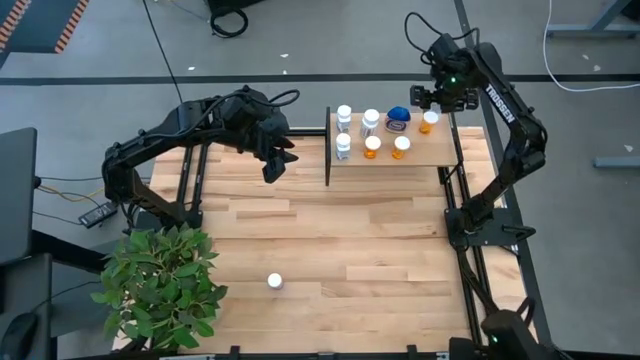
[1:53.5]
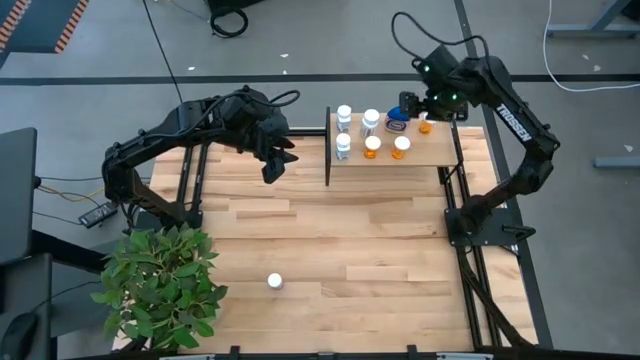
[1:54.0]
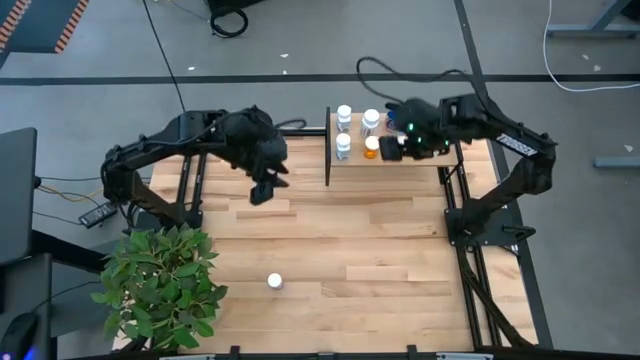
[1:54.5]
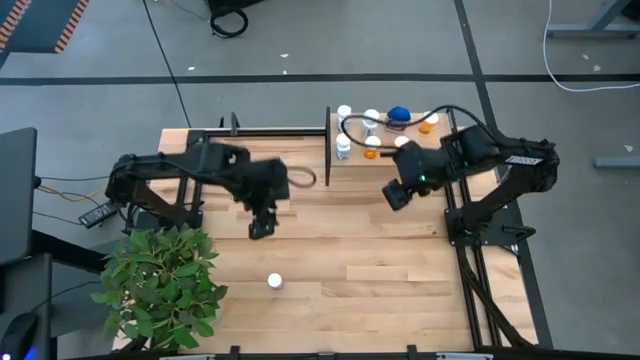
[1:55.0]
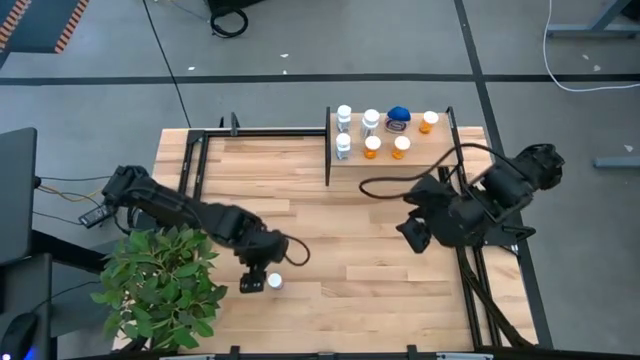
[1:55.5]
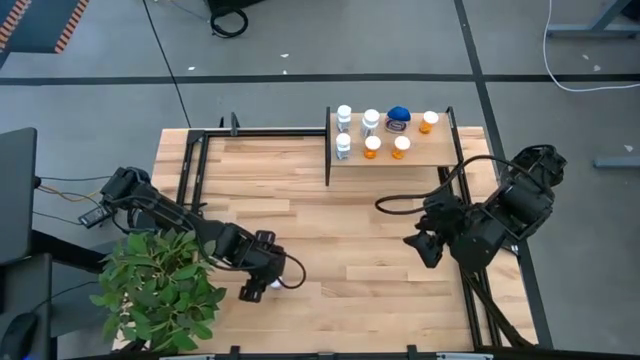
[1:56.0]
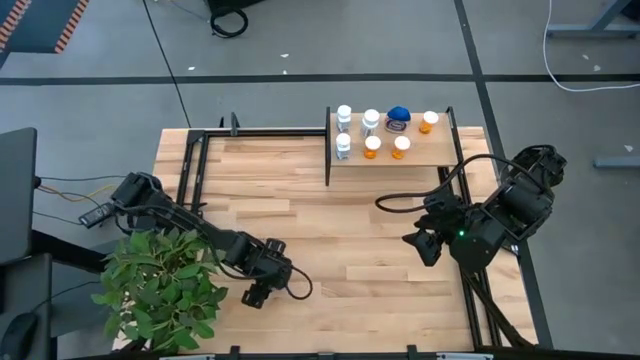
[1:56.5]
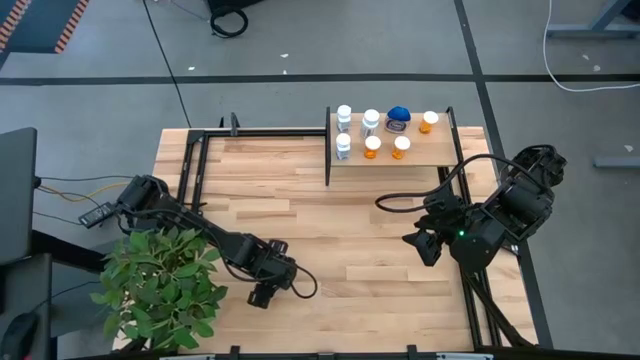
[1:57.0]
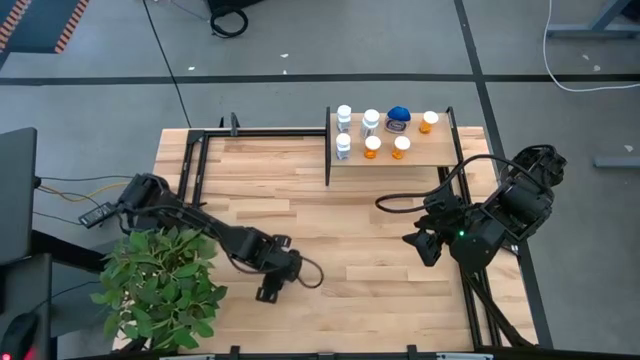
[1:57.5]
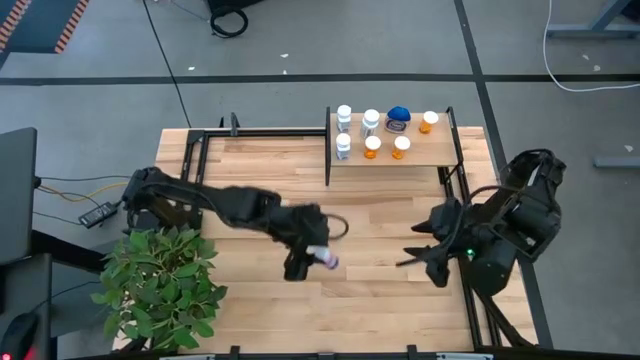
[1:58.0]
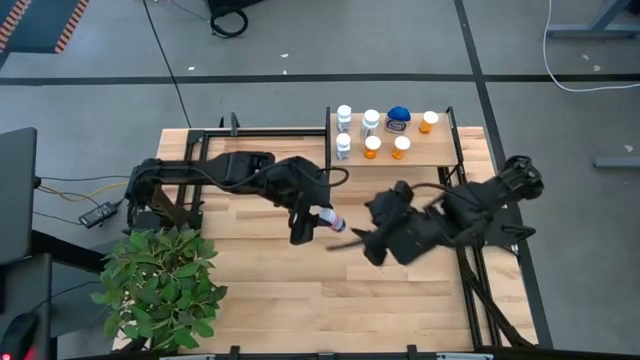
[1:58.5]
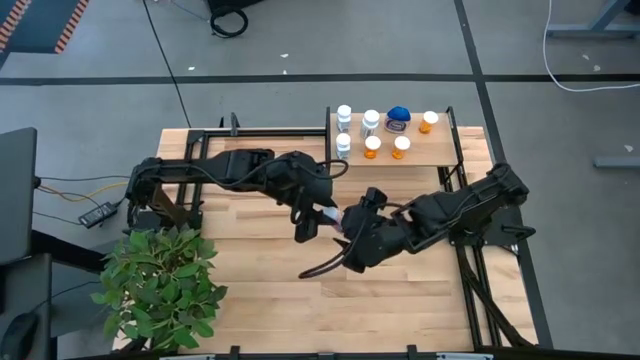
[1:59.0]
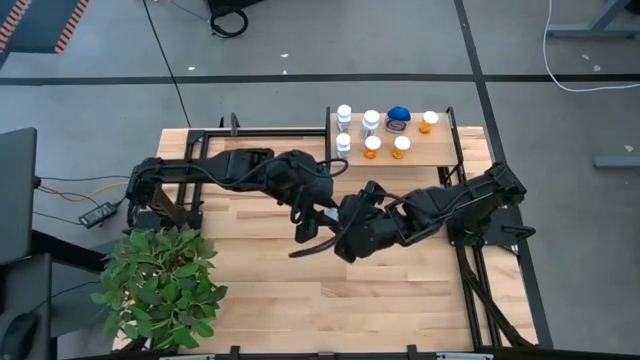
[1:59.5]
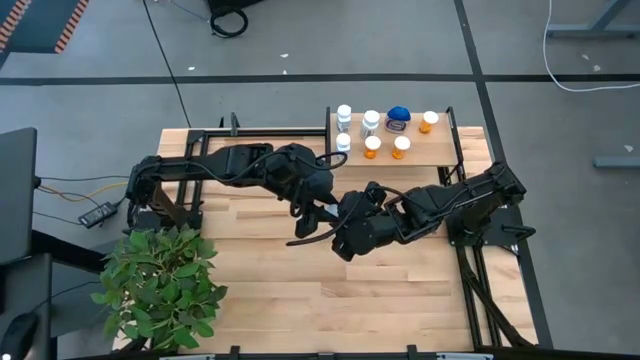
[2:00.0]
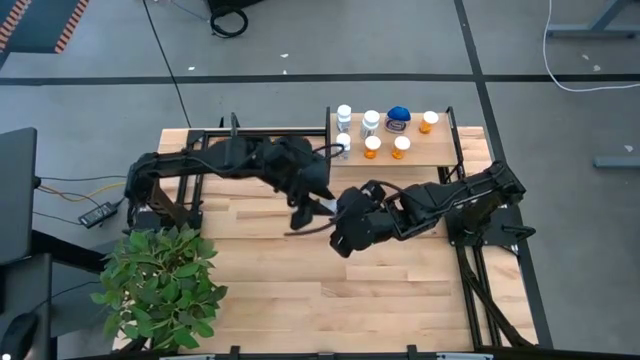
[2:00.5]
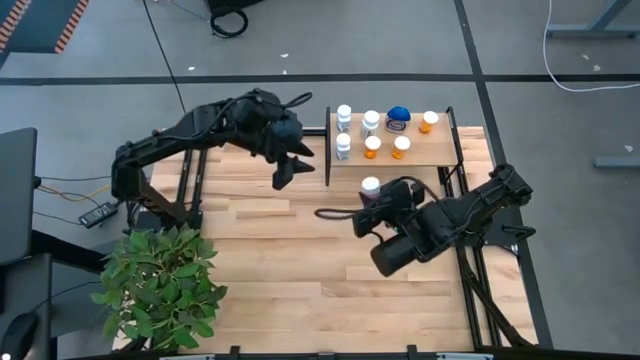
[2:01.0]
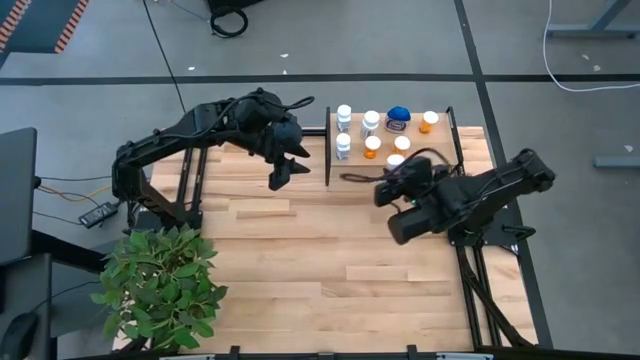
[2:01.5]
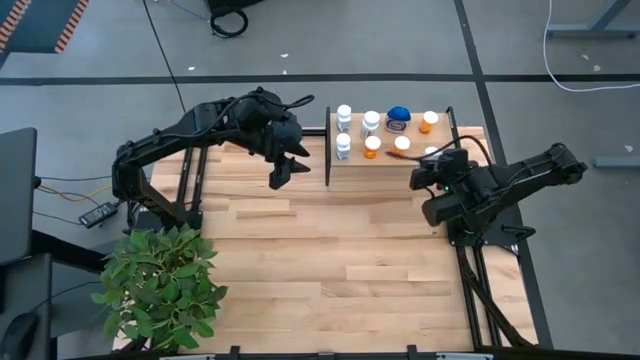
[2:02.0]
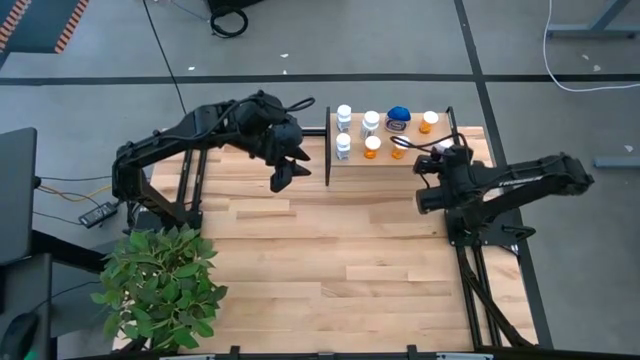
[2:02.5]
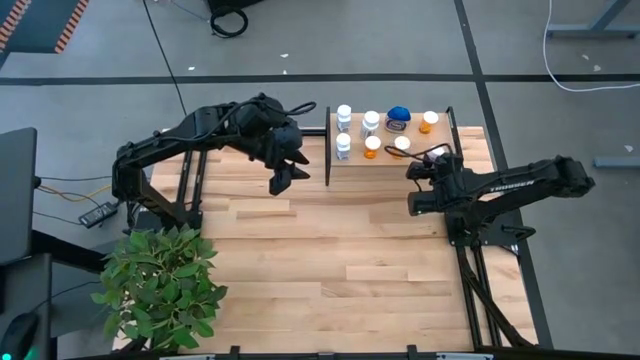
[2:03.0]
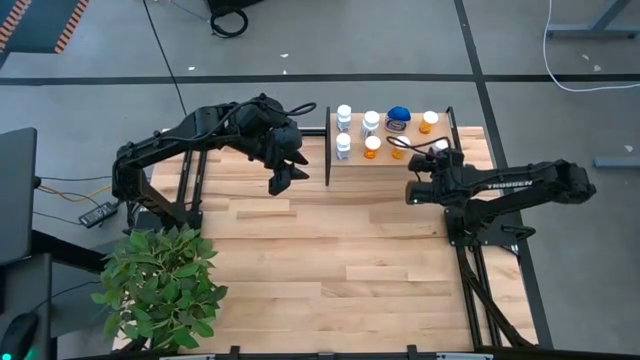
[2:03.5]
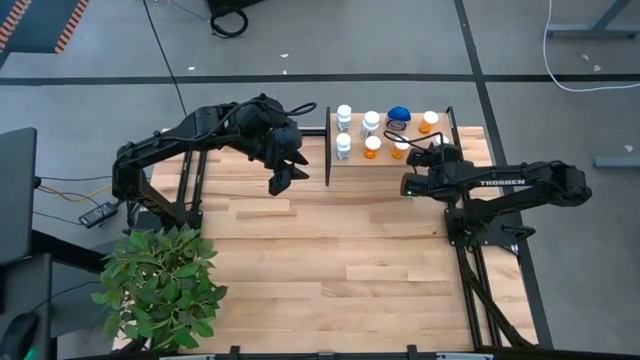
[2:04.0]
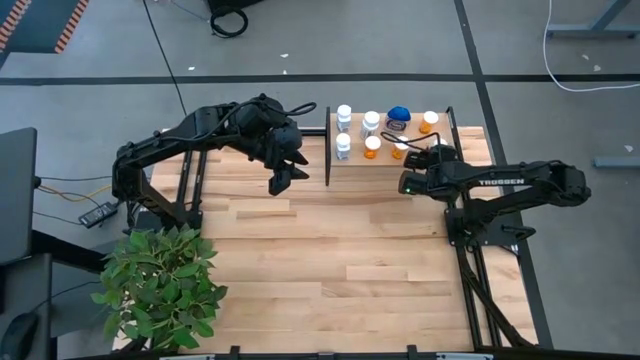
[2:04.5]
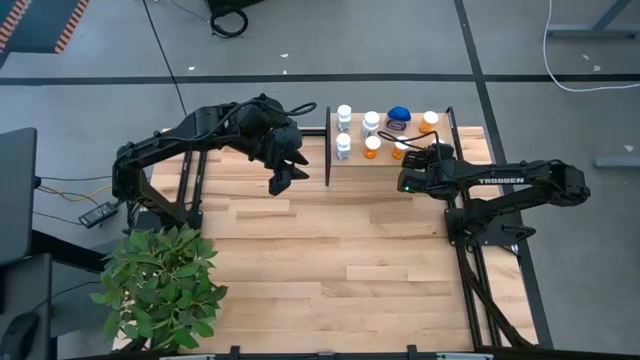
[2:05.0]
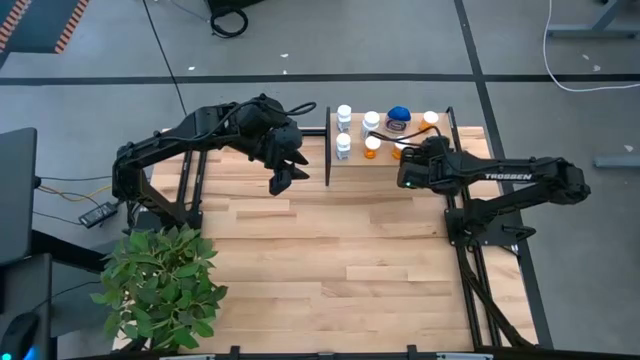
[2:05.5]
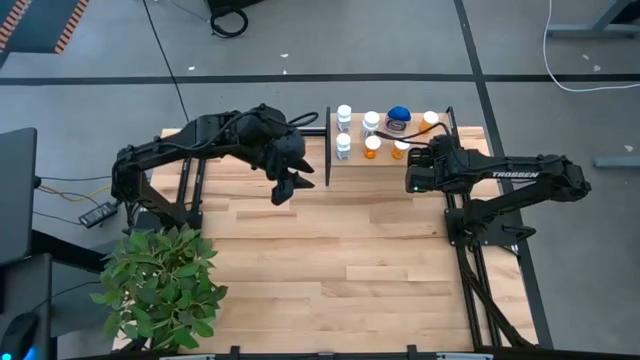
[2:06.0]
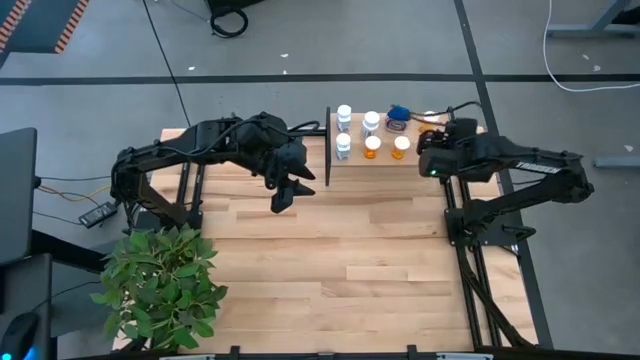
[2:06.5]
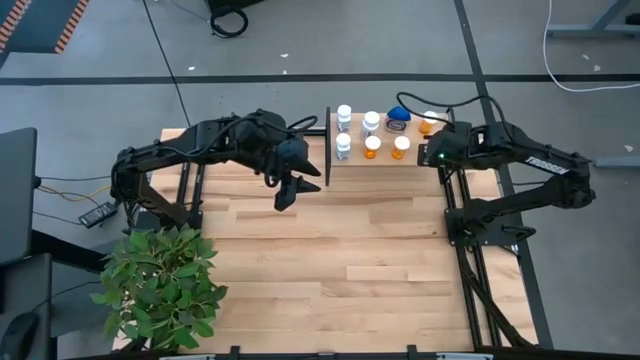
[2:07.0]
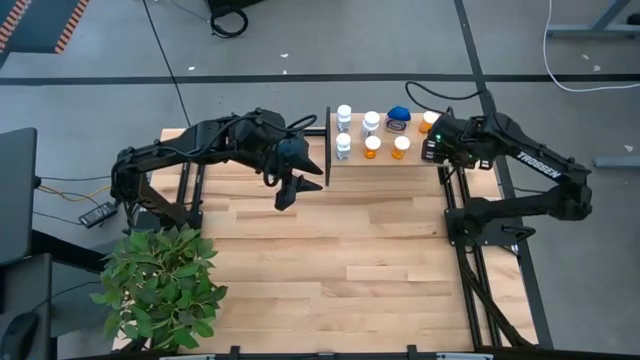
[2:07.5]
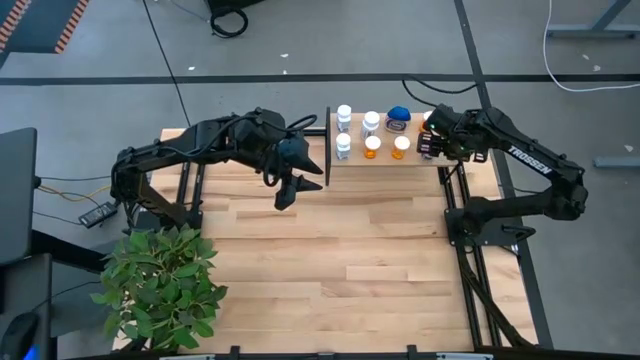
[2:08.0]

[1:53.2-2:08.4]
Task: Pick and place medicine bottles onto shelf by color
Put the pink medicine bottle on the shelf

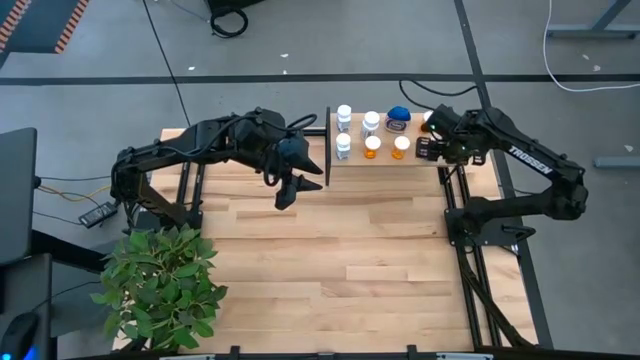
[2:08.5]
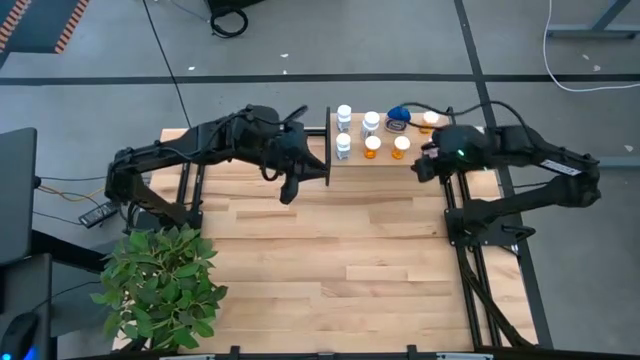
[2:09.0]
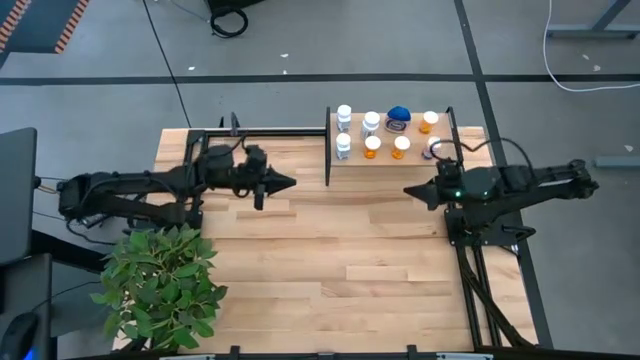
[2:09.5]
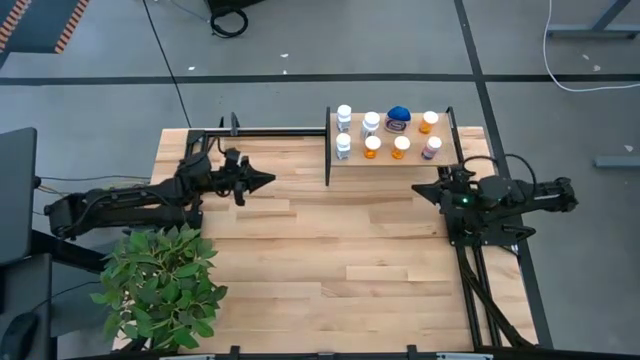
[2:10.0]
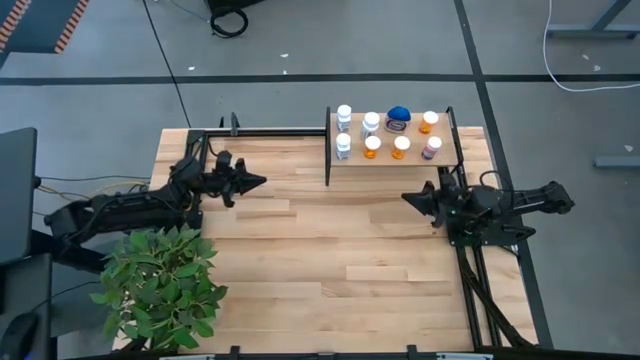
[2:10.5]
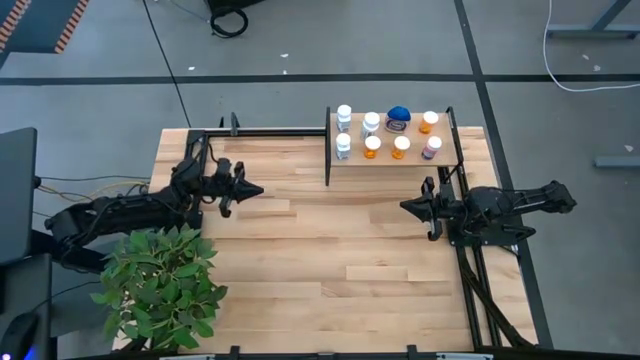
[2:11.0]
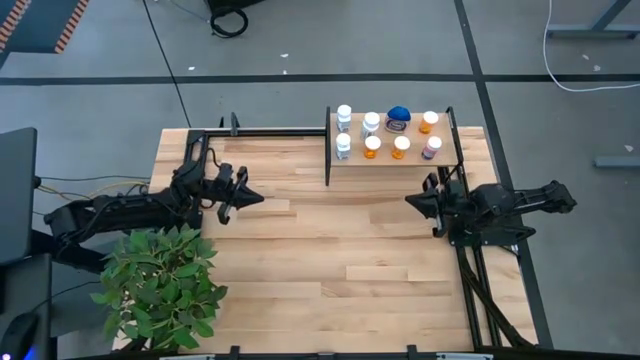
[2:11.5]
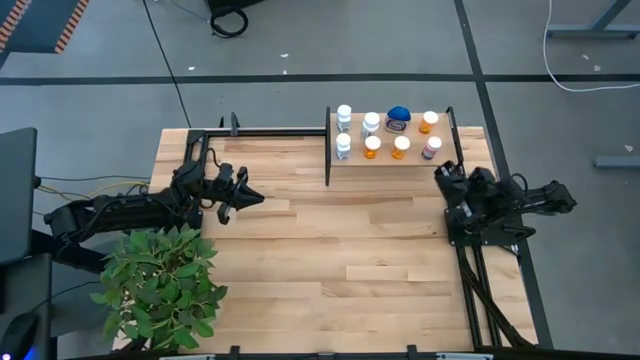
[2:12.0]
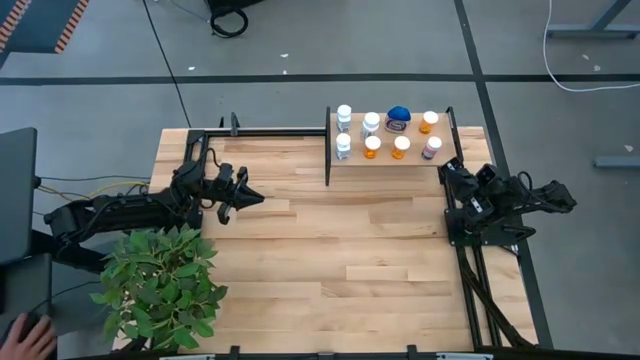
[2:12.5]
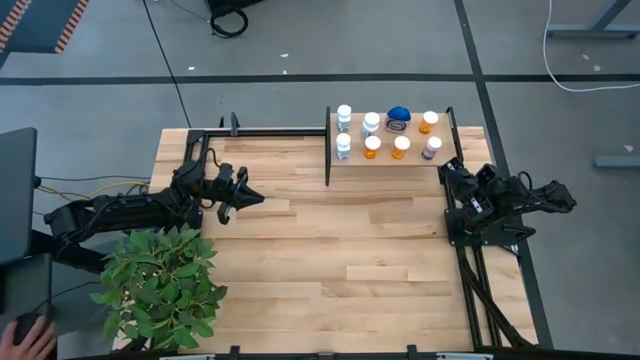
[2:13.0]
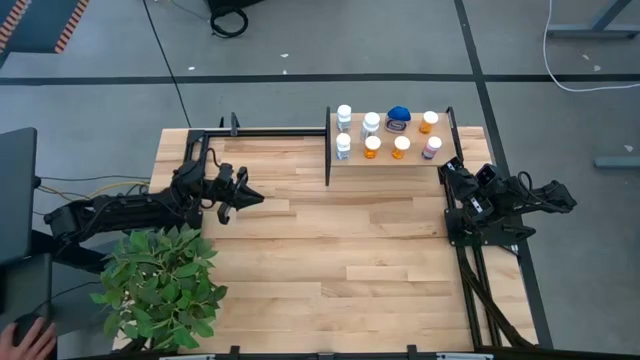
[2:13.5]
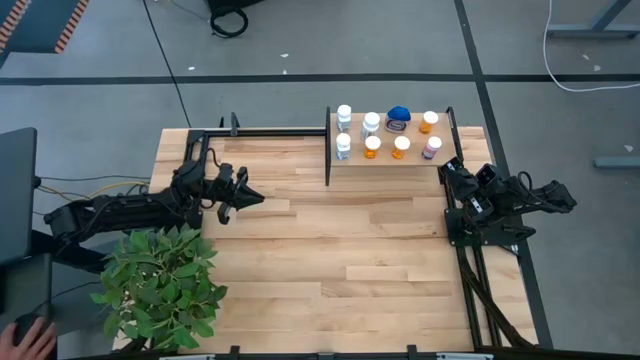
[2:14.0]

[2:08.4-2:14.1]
Return to Home Position
